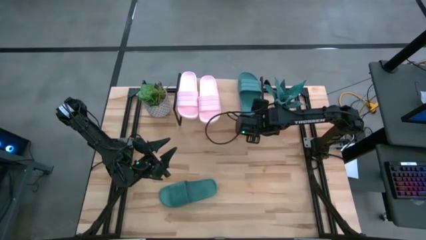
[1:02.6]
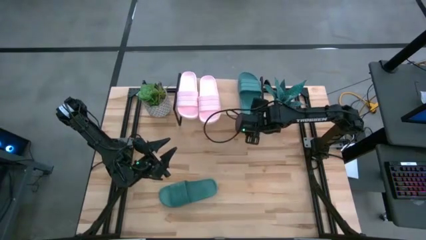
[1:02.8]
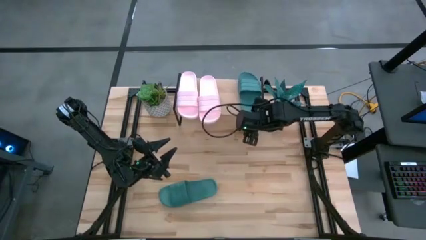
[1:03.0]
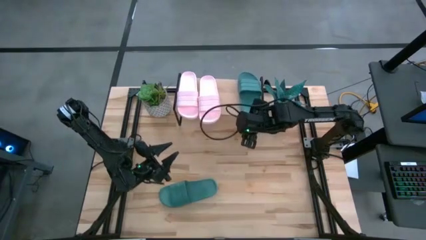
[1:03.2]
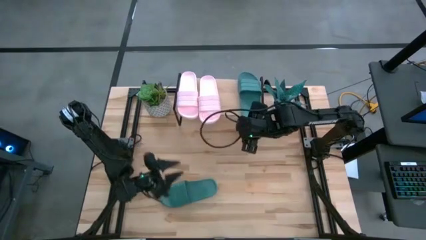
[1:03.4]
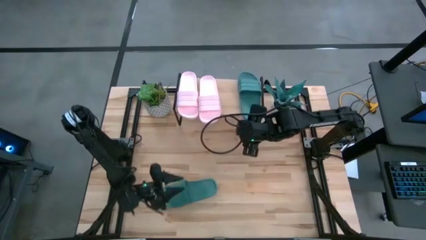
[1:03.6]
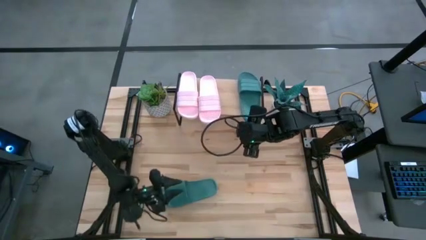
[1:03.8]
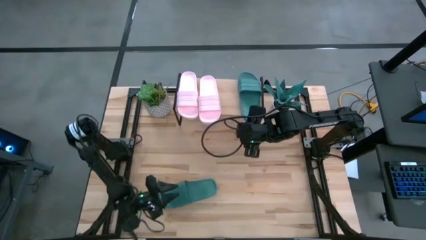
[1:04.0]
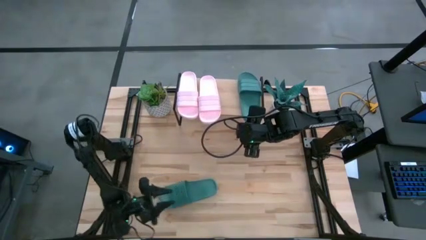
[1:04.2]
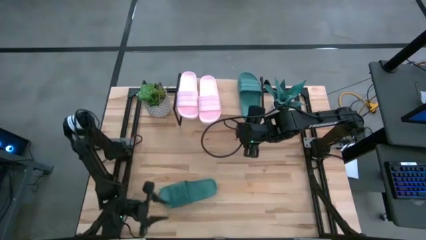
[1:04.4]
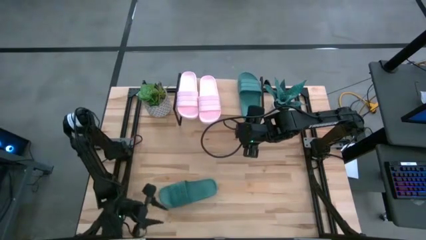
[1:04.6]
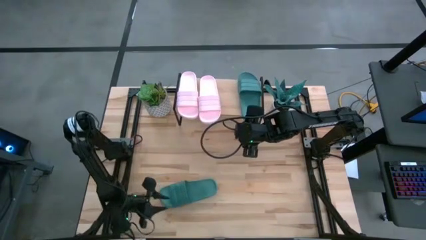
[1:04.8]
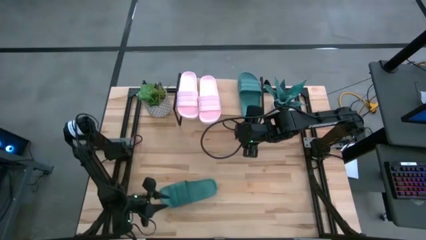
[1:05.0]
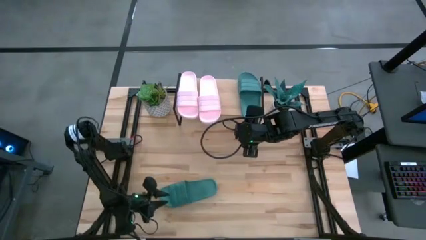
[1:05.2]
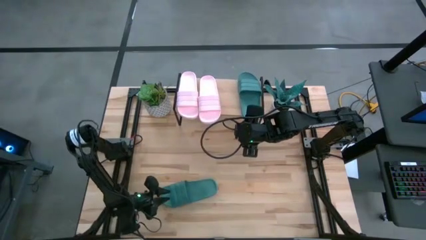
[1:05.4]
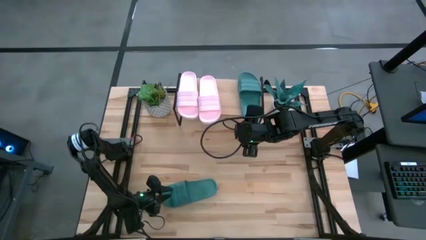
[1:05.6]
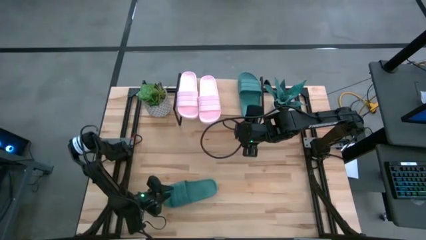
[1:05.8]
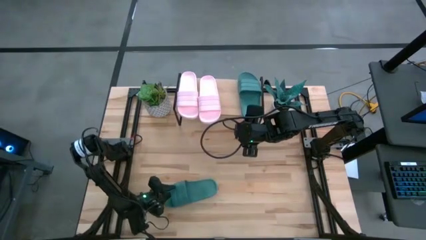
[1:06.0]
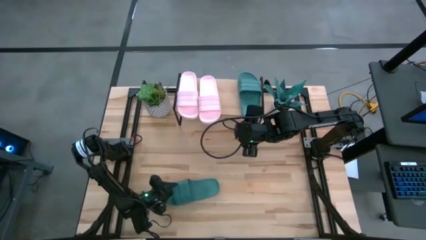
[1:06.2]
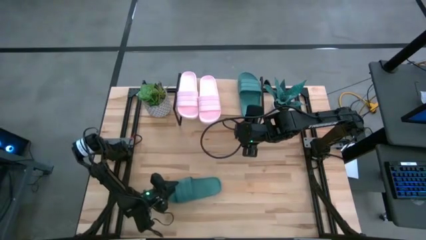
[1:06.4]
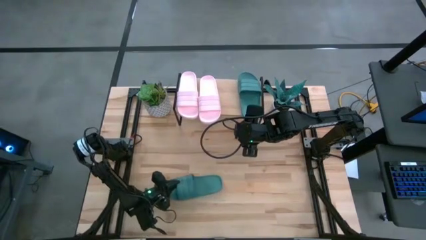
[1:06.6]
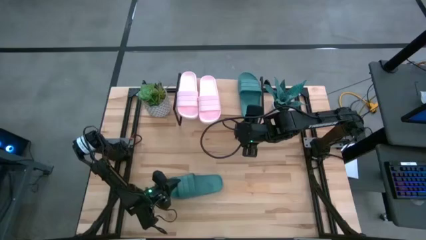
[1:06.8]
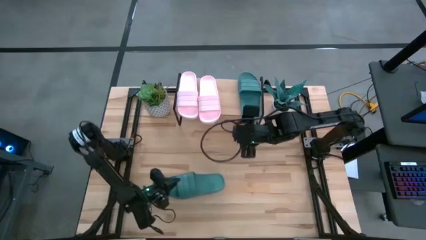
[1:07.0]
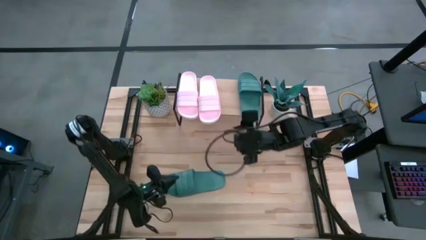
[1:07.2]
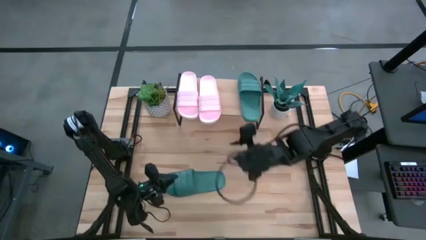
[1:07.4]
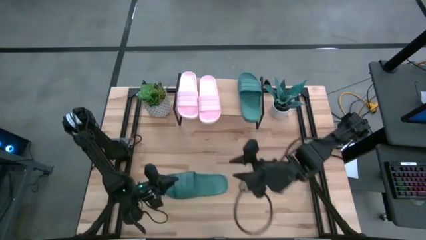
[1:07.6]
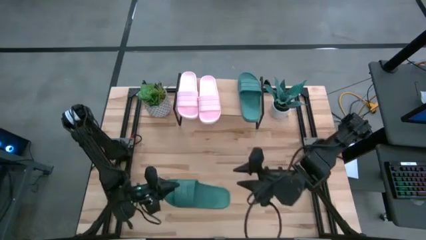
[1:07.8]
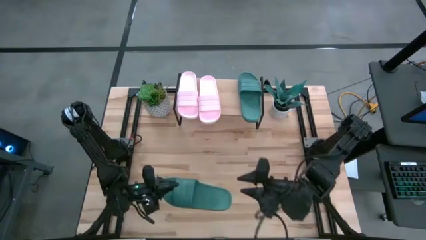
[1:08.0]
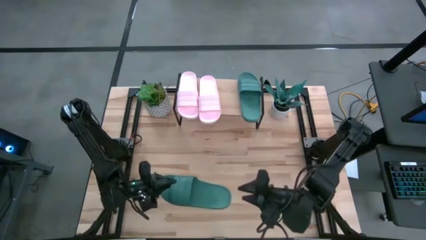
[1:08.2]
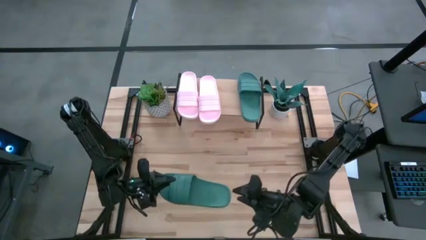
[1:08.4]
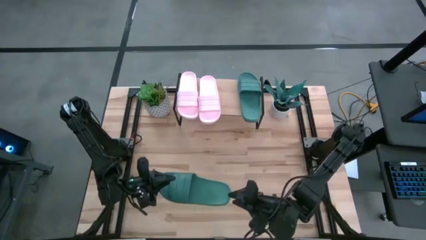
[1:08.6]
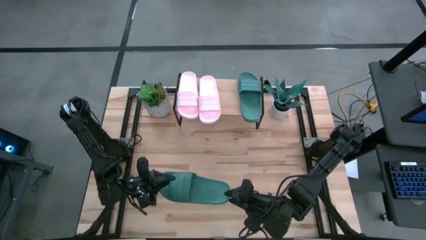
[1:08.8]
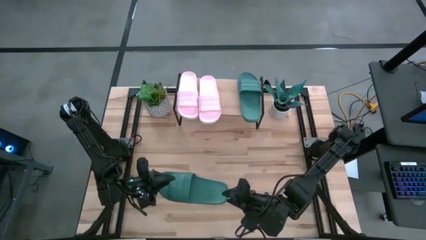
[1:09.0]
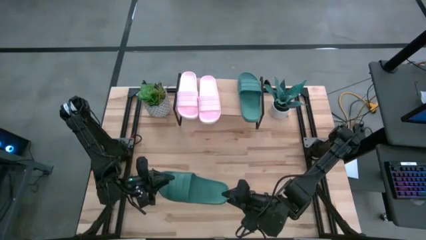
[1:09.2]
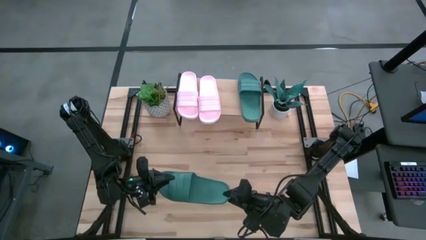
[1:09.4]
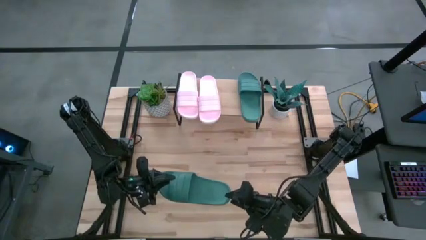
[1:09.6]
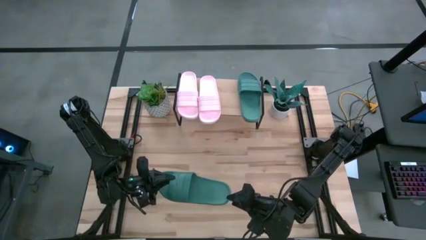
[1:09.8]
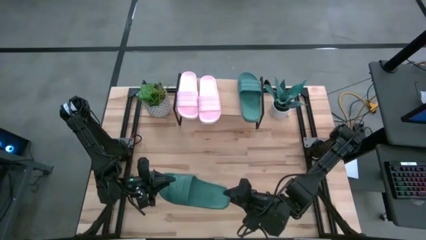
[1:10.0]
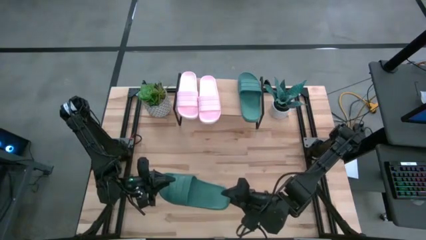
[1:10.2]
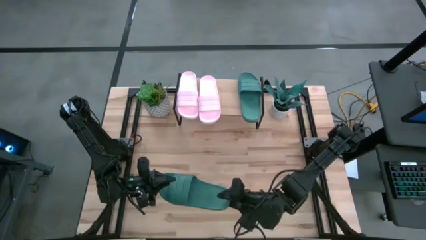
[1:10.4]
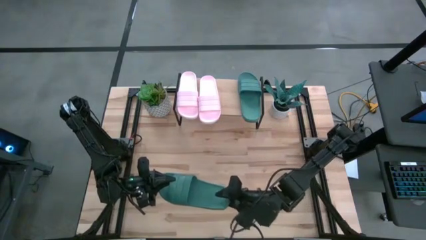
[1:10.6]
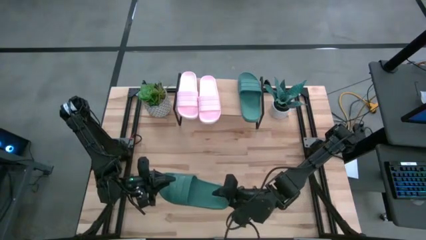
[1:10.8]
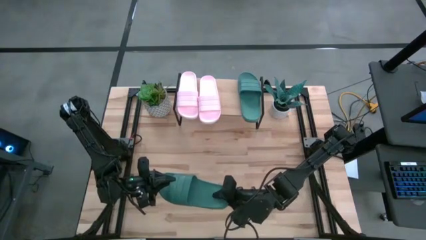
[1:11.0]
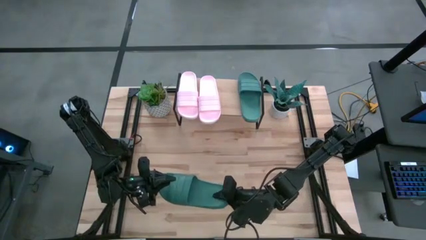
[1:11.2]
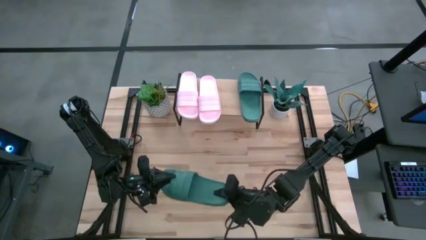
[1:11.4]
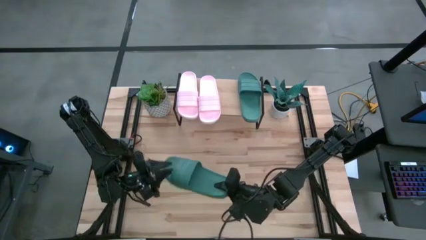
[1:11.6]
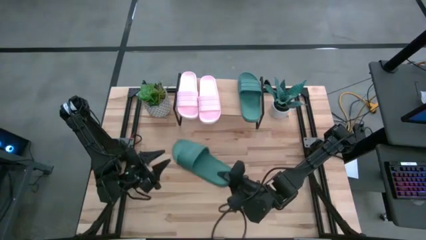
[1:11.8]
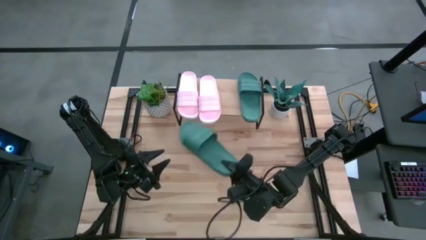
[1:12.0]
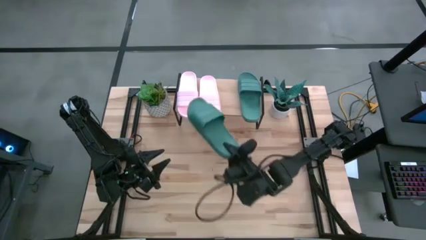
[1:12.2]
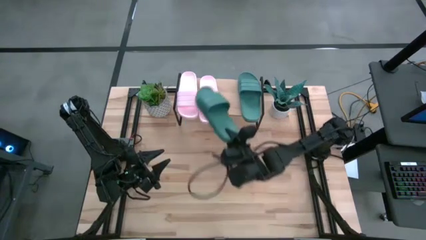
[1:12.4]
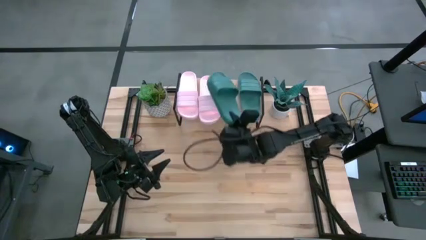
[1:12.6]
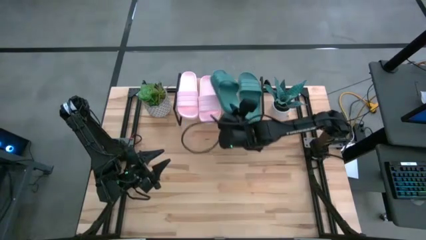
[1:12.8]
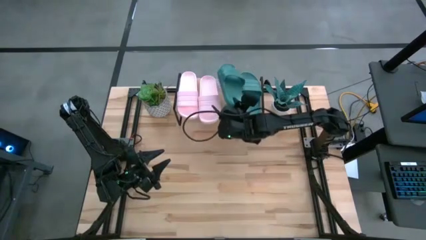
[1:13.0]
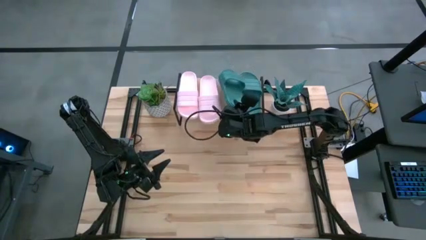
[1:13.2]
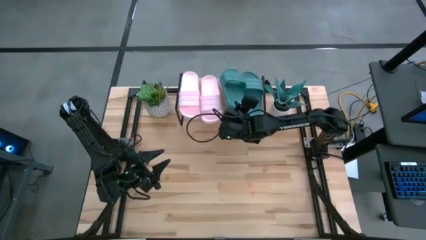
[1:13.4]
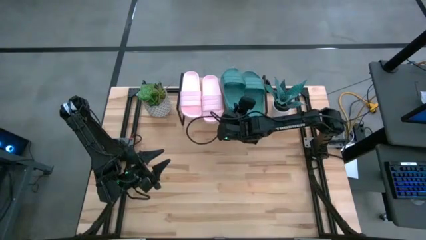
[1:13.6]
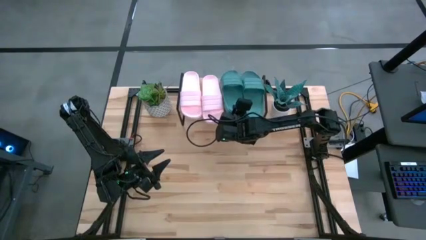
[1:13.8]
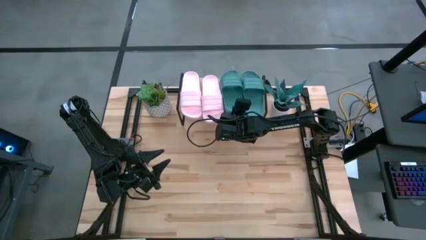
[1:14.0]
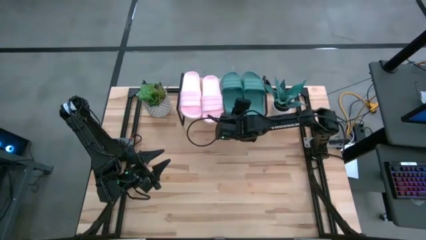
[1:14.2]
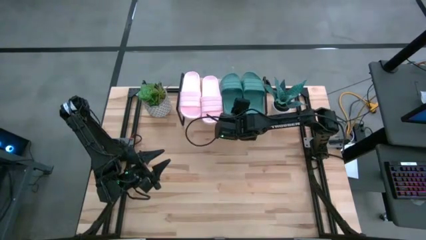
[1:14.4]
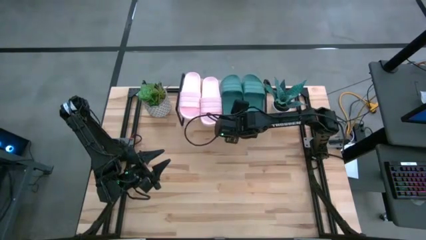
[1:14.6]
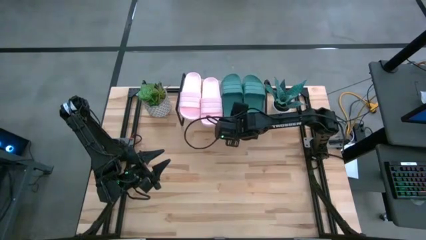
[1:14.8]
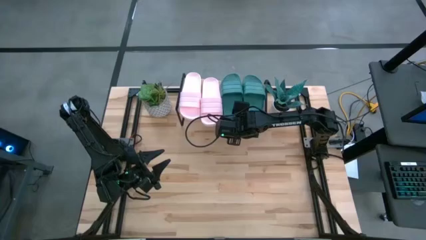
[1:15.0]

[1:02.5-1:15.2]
Task: Pick and place slides into the shelf
Put the green slipper on the shelf

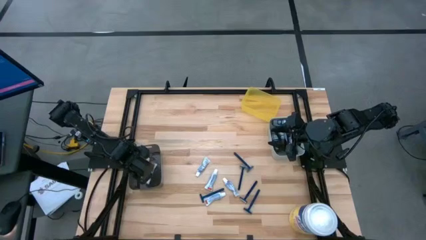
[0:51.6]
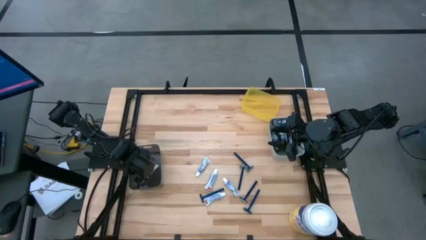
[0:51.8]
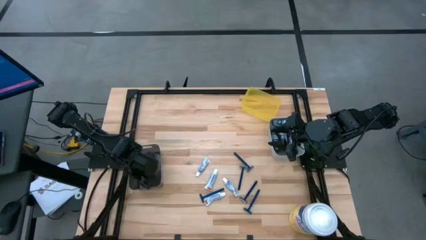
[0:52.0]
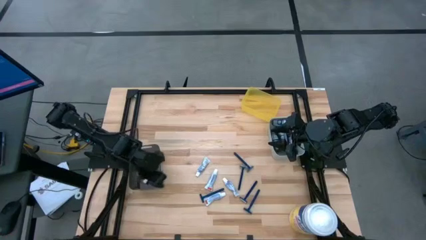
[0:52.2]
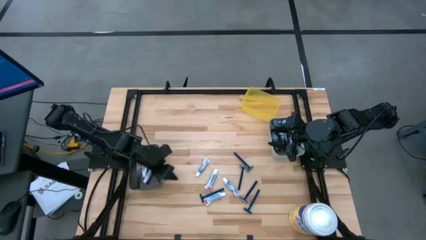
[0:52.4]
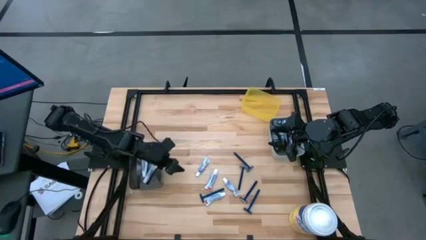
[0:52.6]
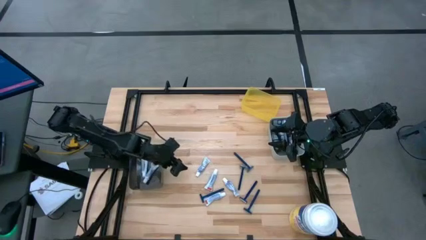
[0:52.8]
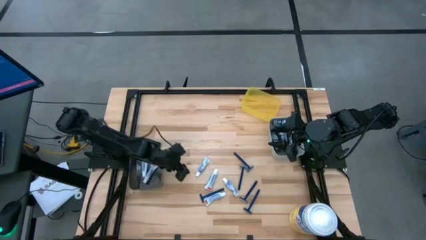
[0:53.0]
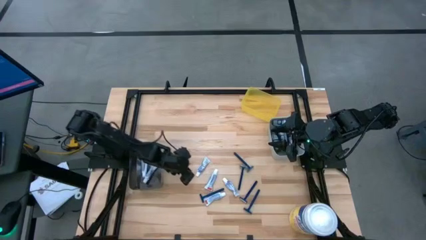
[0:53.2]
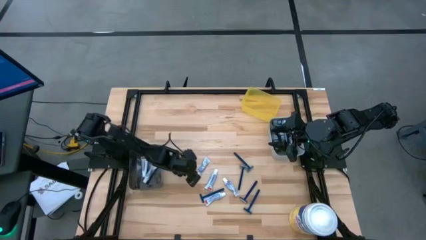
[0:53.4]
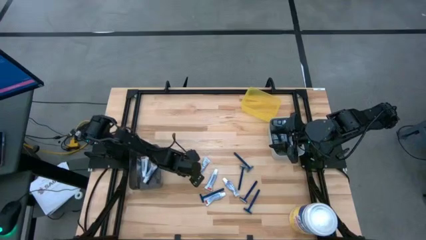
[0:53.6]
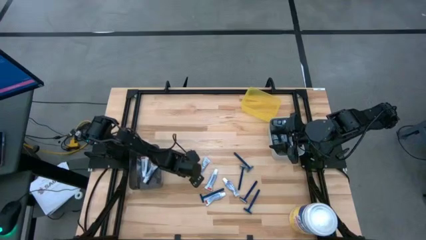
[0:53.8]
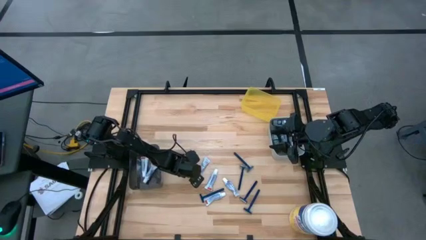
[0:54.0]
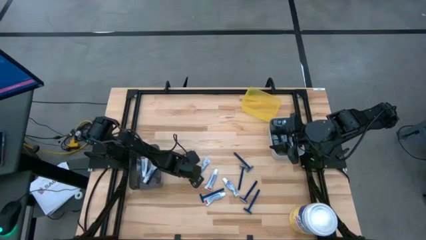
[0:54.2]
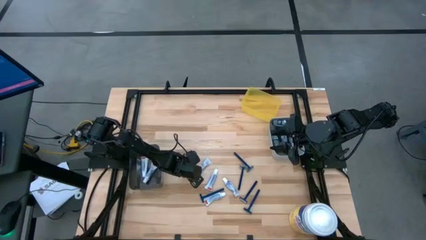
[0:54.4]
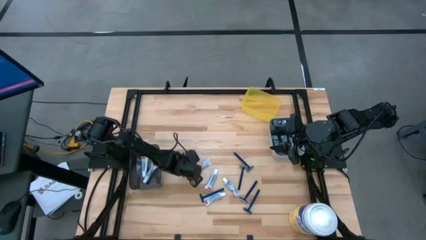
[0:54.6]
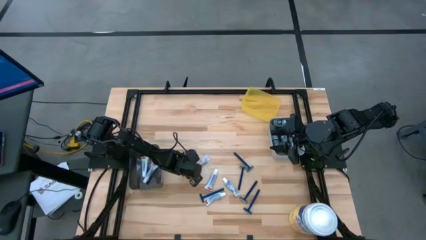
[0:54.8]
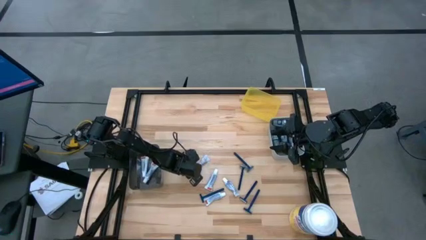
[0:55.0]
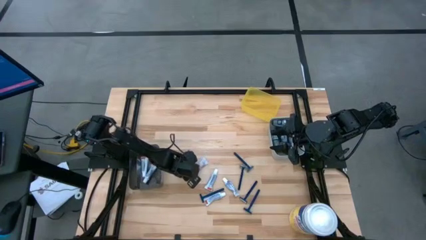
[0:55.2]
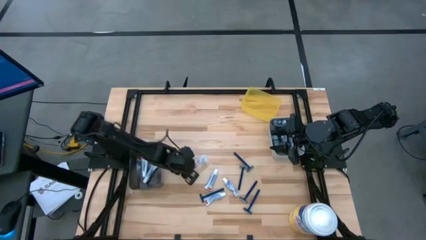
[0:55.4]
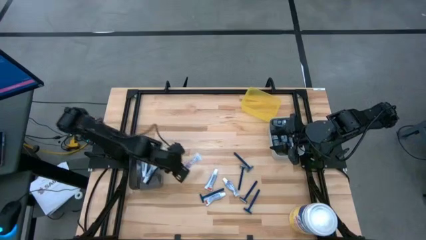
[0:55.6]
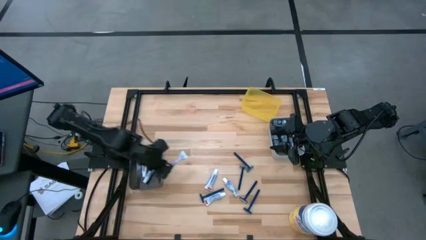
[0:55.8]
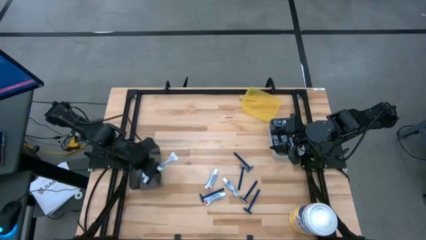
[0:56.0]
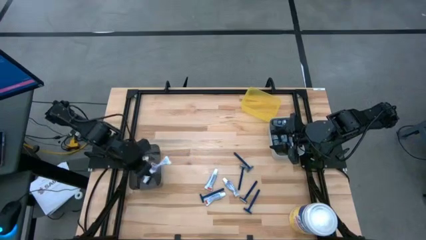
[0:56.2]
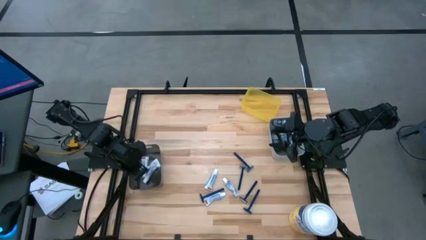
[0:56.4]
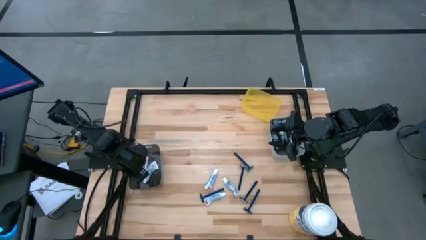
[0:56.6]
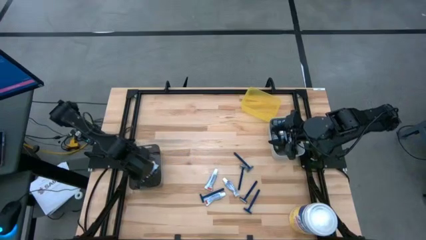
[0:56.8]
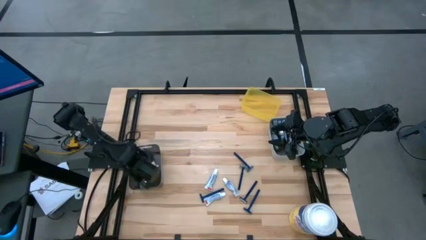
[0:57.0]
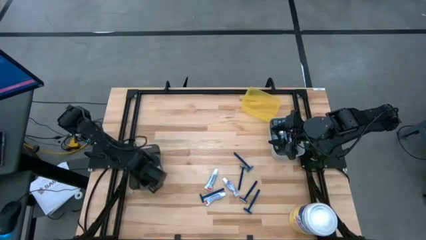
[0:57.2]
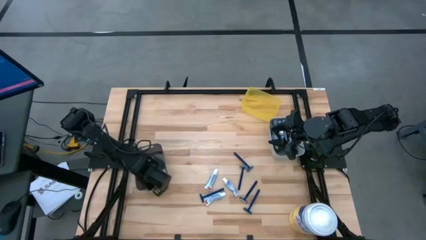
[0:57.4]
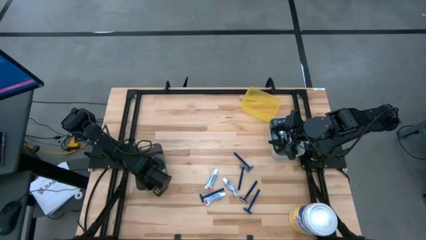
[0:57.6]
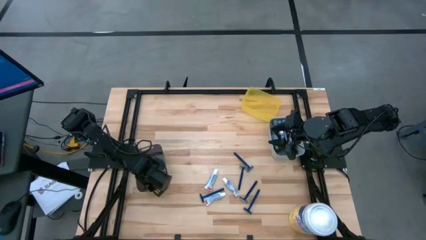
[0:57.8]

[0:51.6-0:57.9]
Task: Pick & Place Travel size toiletries
Put the white toothpaste into the black bin
